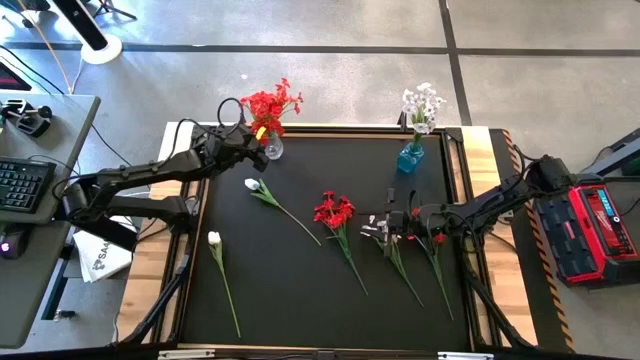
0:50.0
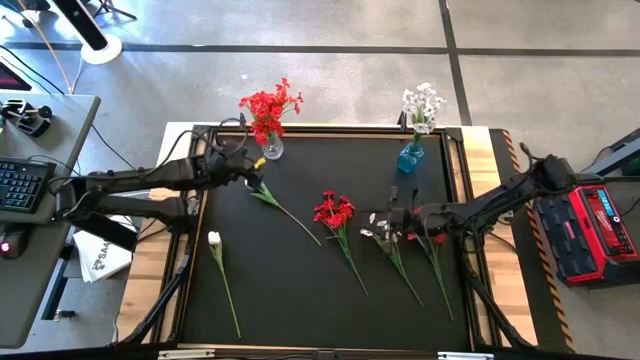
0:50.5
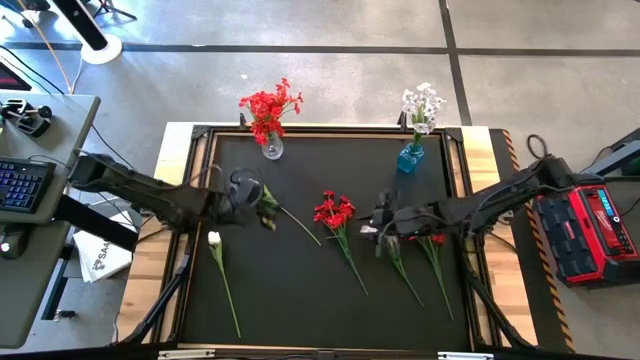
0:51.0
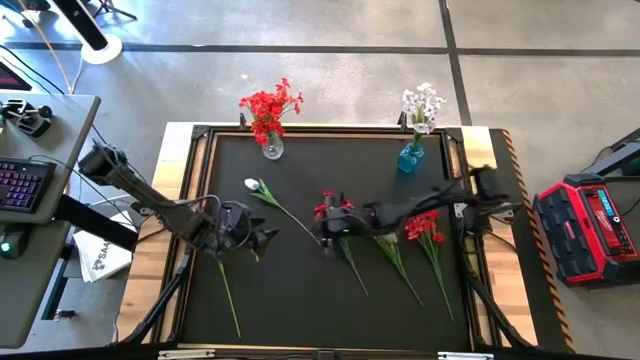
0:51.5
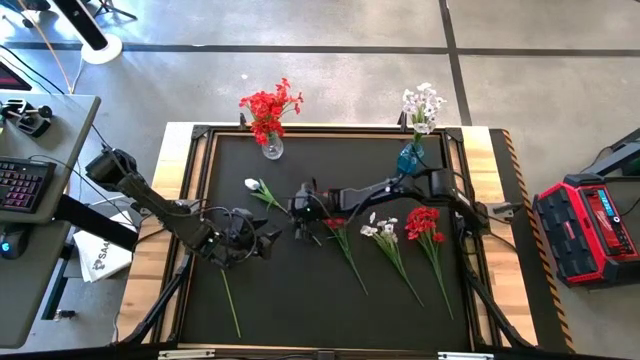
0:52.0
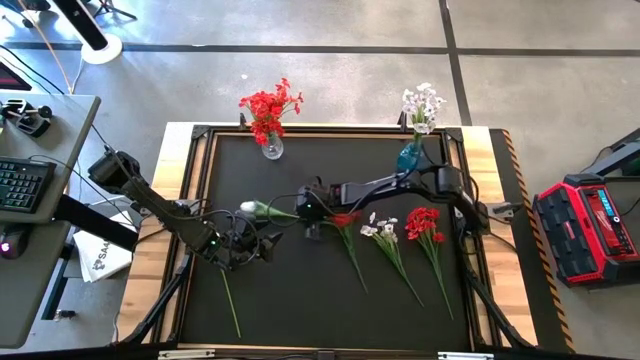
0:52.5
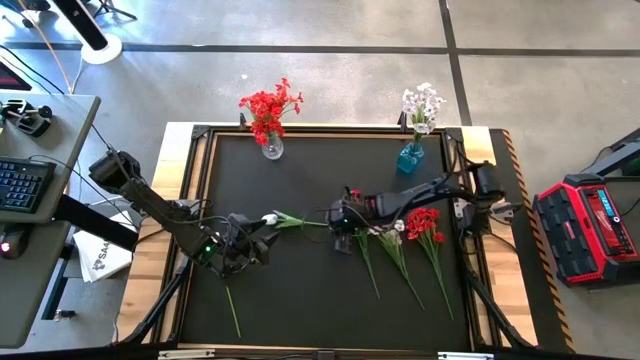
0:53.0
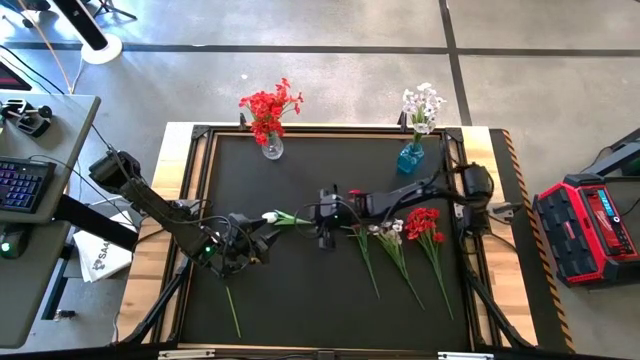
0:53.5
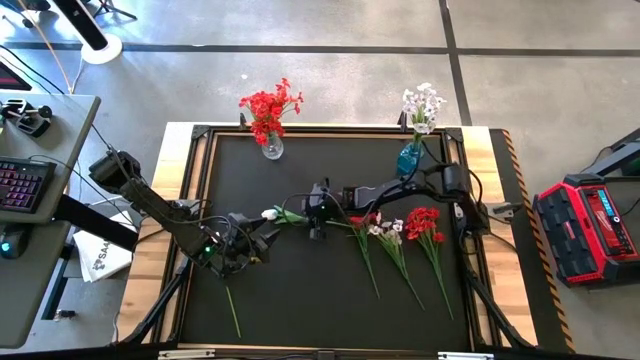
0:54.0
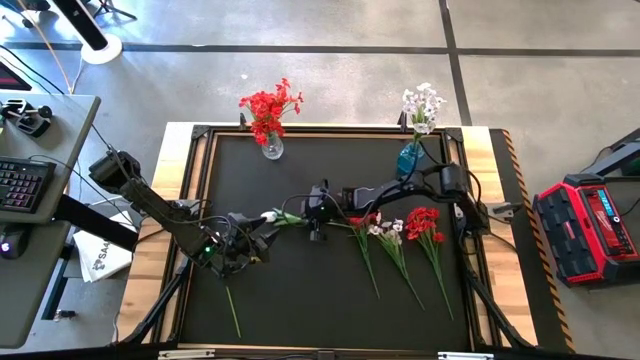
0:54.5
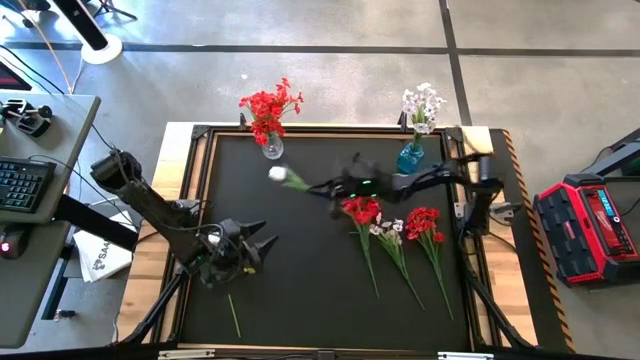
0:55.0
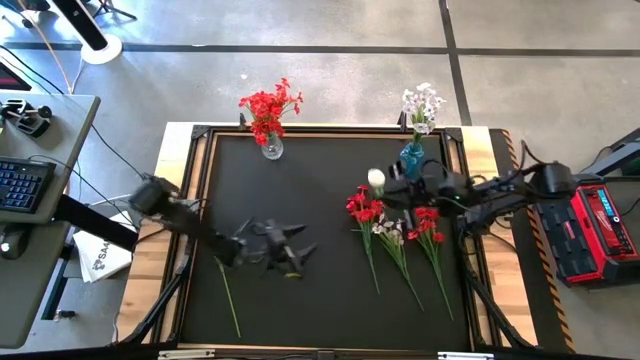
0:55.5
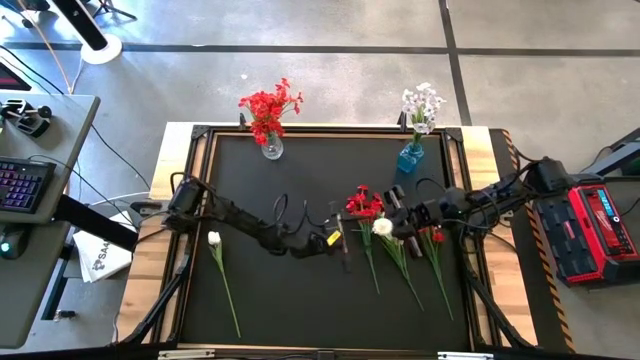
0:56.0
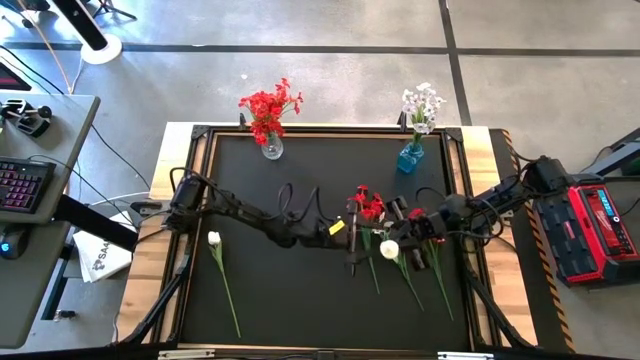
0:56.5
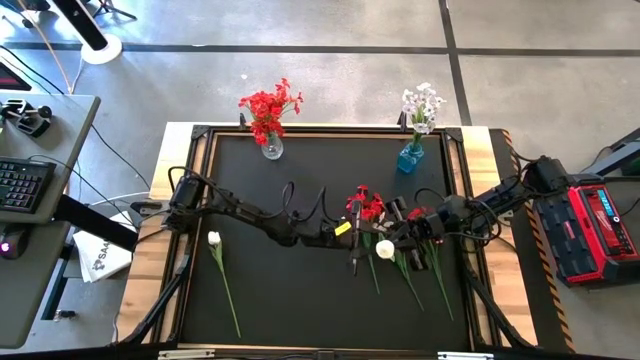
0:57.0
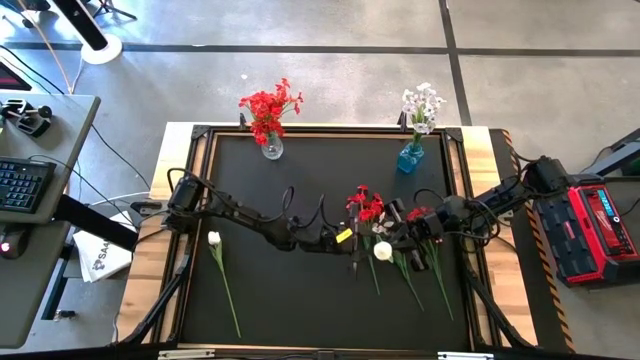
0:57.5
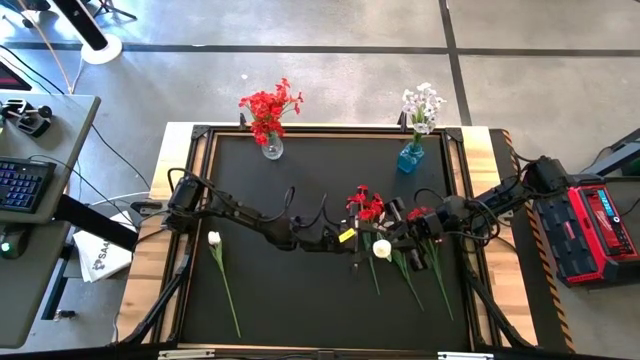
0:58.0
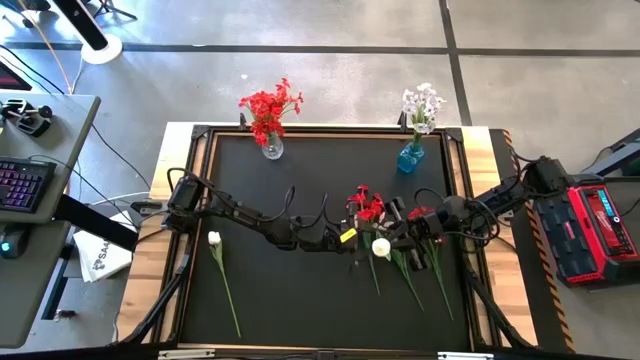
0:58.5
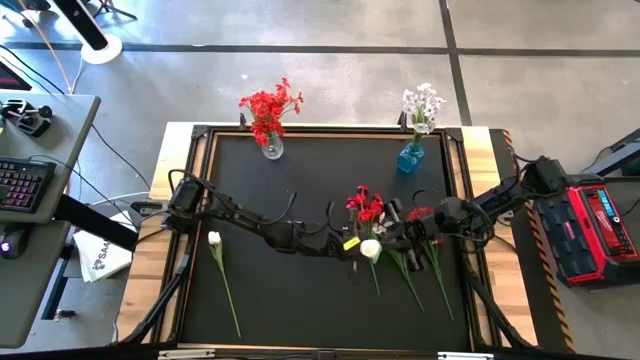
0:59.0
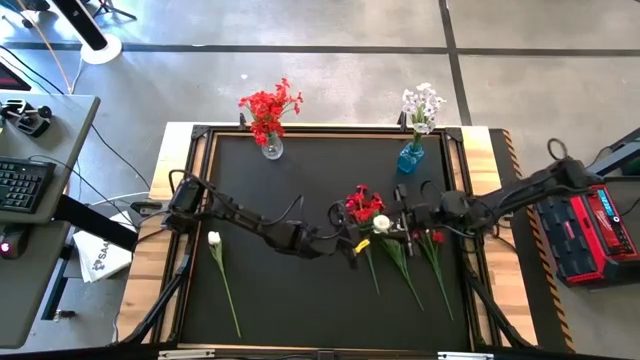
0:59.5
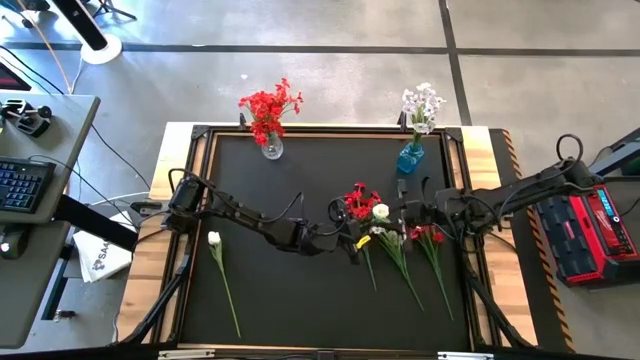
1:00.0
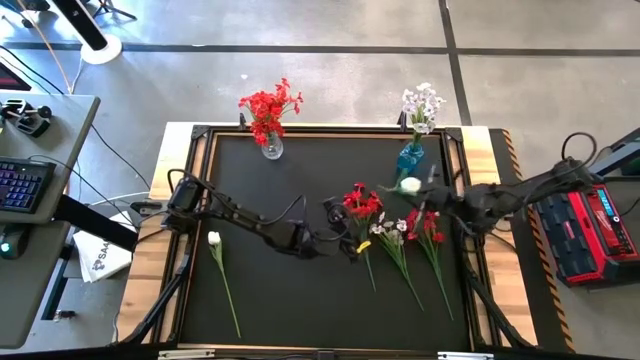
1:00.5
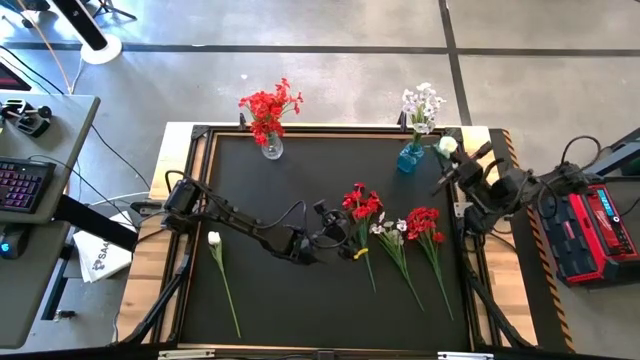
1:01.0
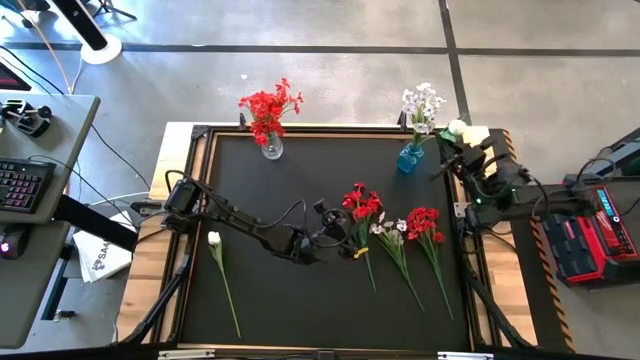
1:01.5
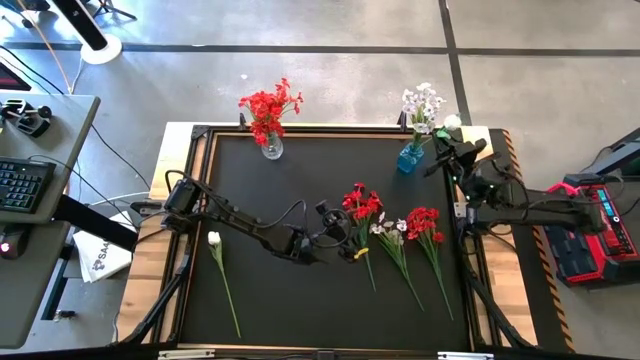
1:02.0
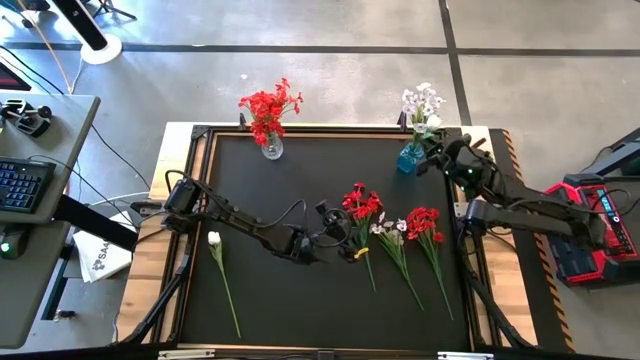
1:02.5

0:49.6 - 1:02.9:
Task: Sort flowers into vase by color
Put the top white flower into the blue vase

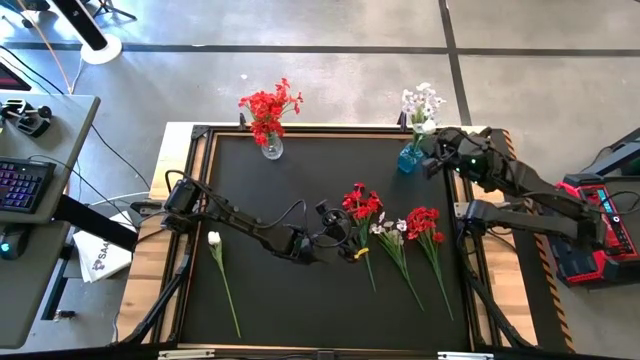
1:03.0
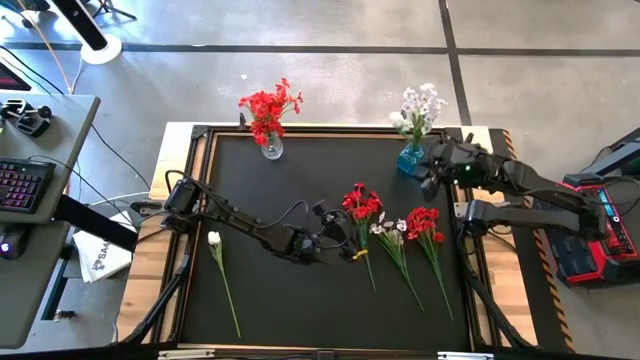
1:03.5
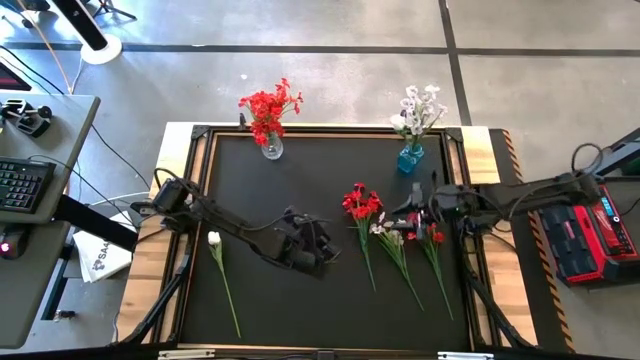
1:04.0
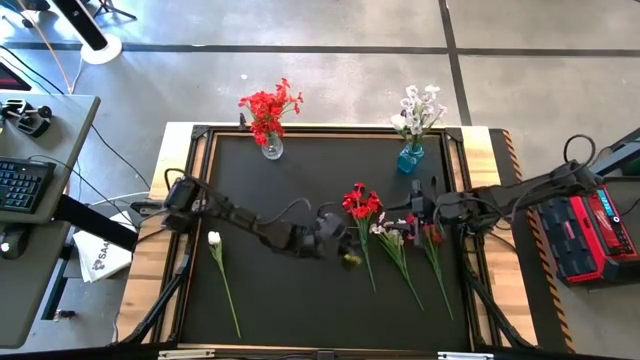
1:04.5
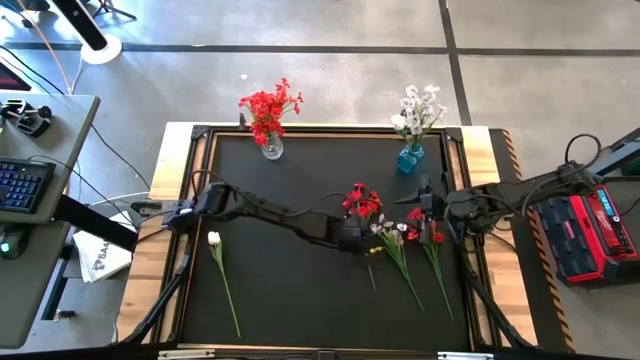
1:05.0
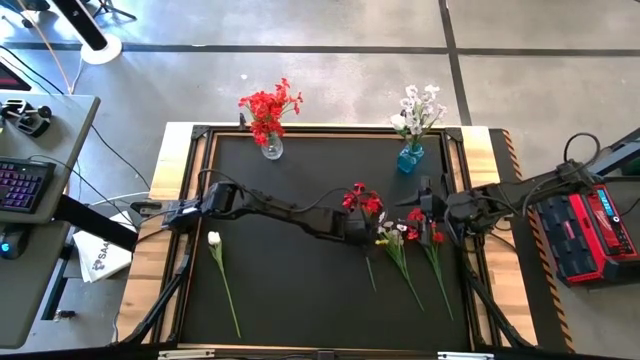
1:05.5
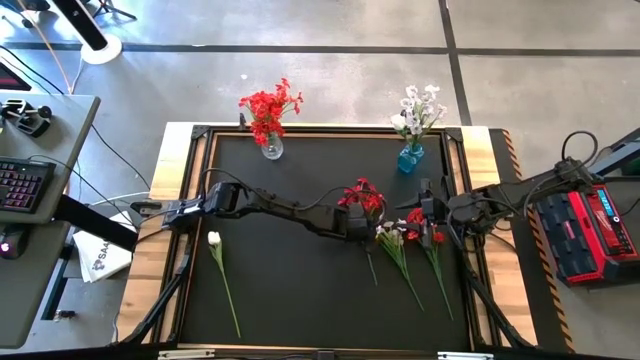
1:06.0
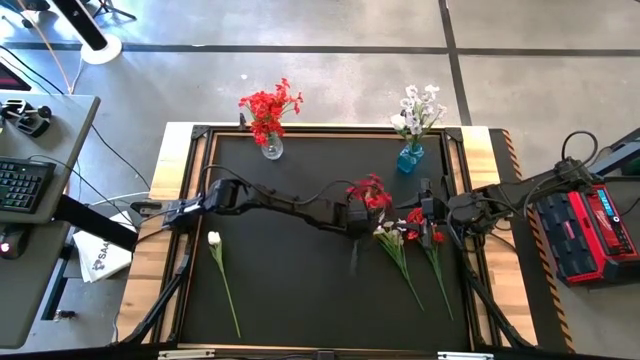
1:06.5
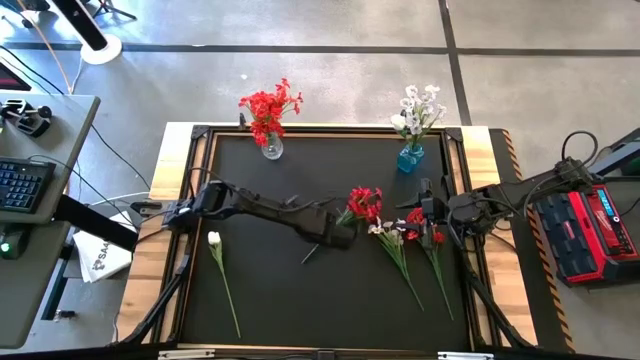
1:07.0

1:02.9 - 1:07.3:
Put the left red flowers into the transparent vase

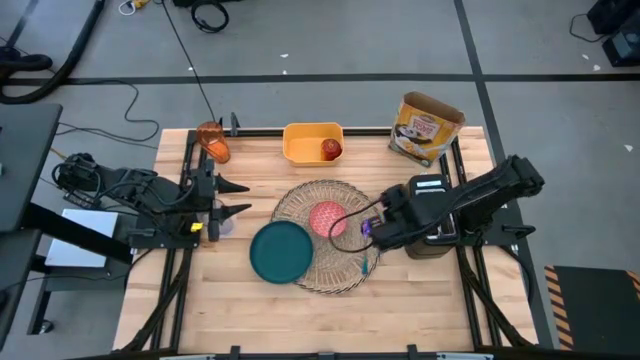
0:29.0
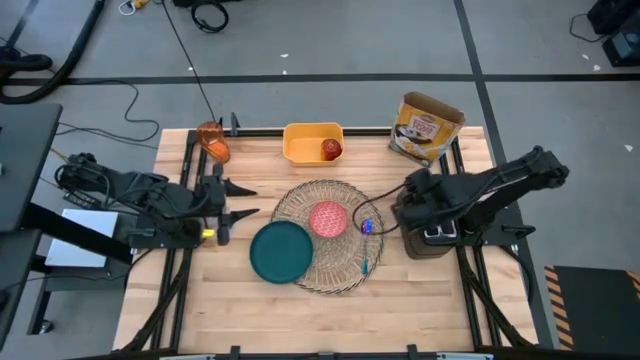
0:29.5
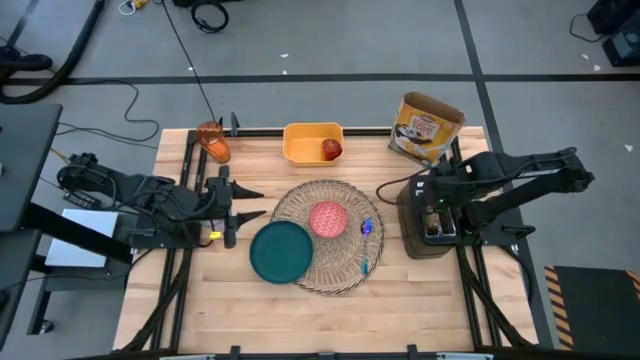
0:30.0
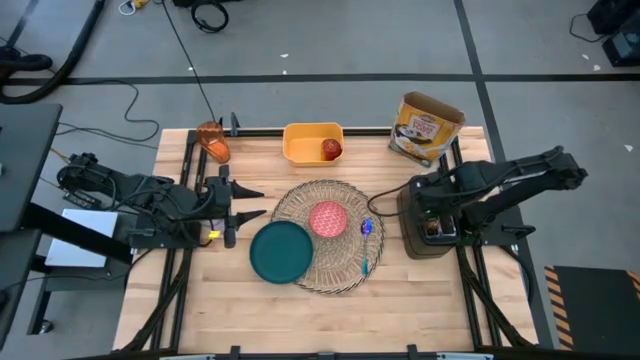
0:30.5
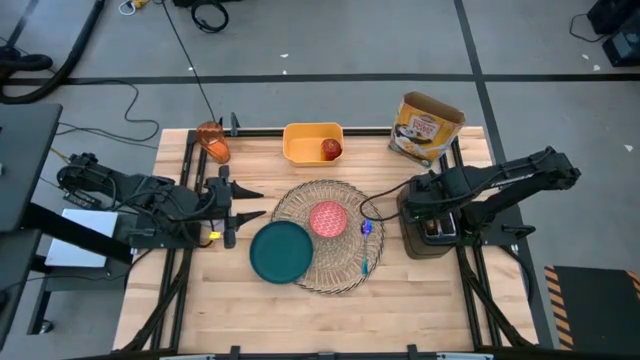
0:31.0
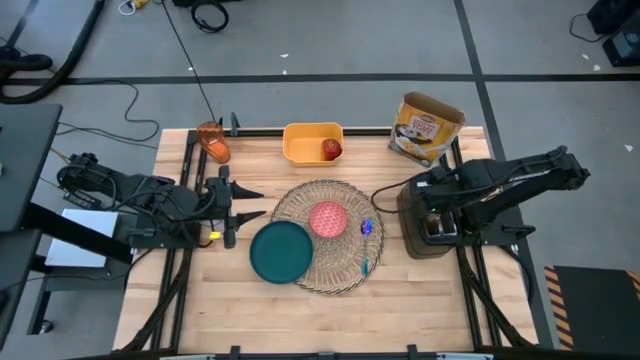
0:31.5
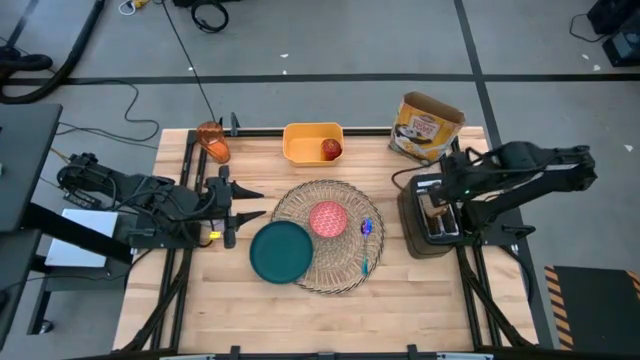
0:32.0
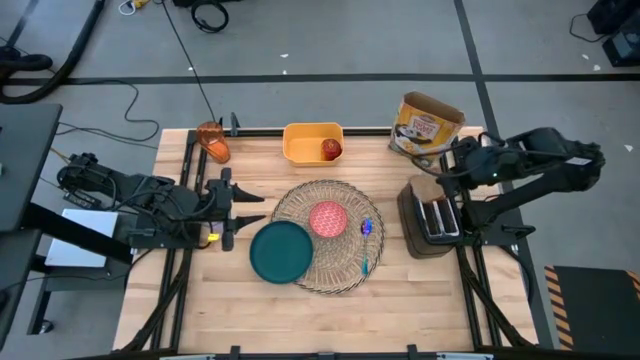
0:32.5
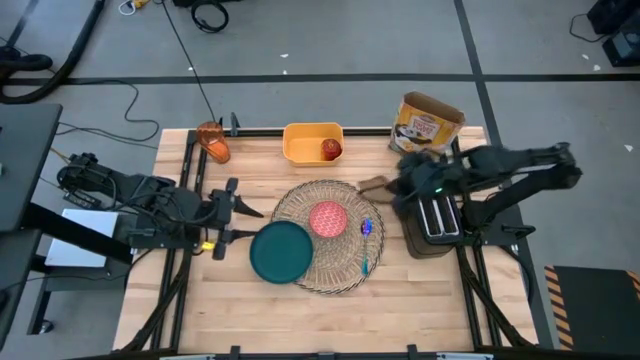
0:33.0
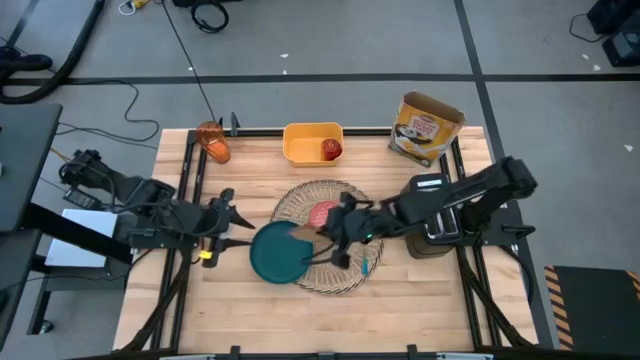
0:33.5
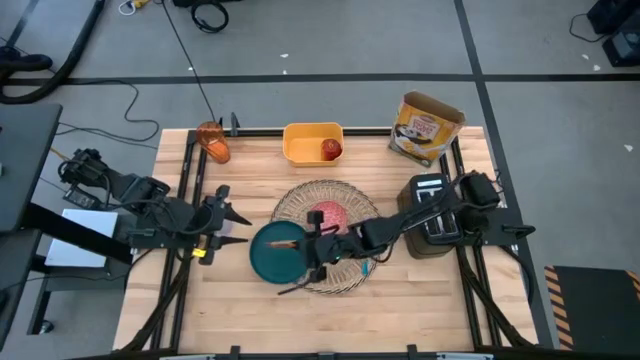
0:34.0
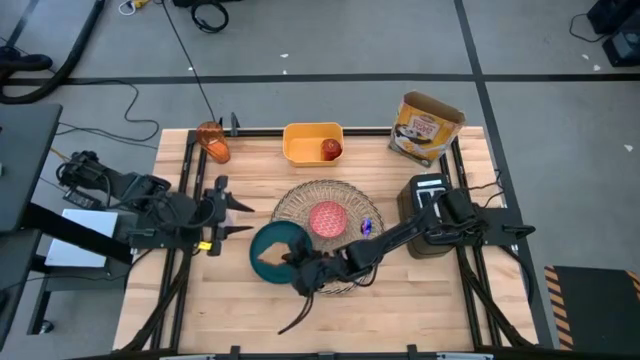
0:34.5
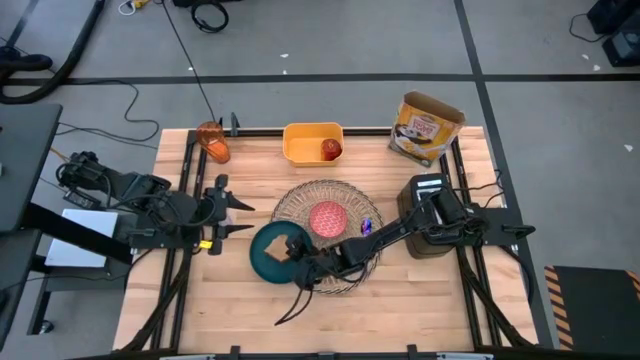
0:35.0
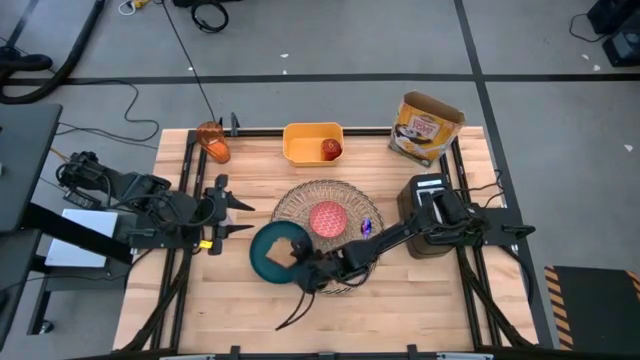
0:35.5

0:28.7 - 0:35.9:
Task: Arrange a breakfast setting
Put the toasted bread on the dark green plate
